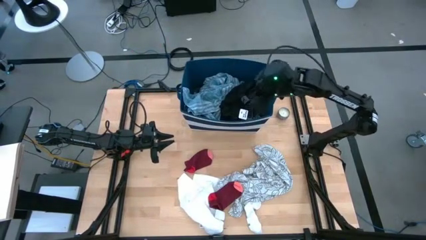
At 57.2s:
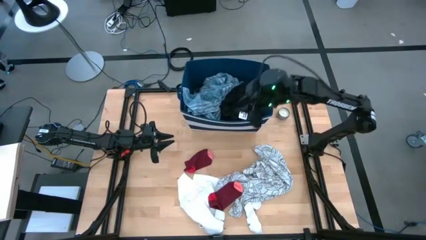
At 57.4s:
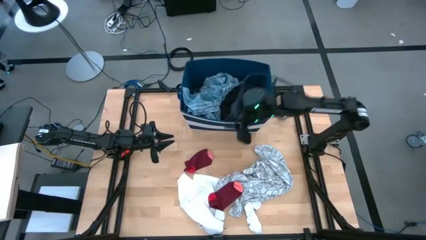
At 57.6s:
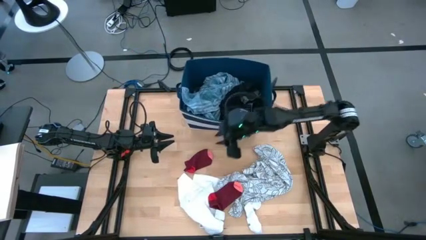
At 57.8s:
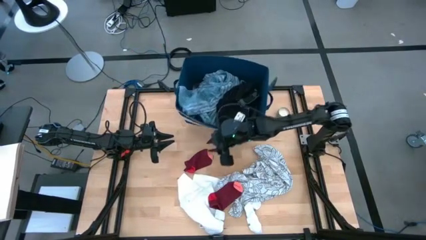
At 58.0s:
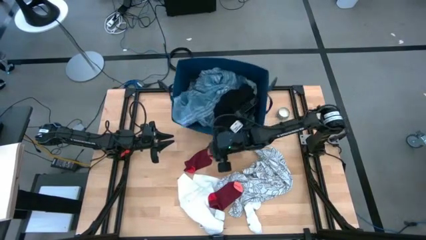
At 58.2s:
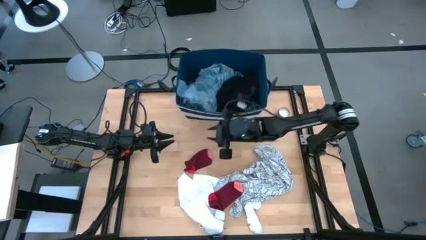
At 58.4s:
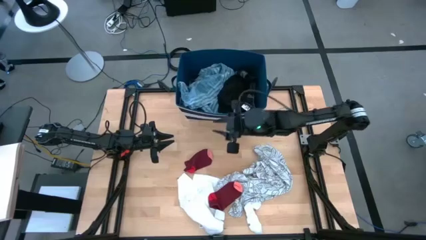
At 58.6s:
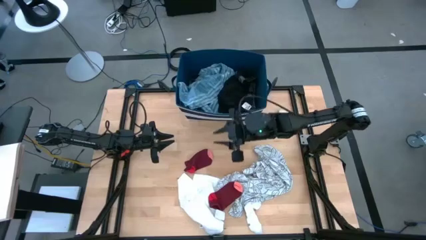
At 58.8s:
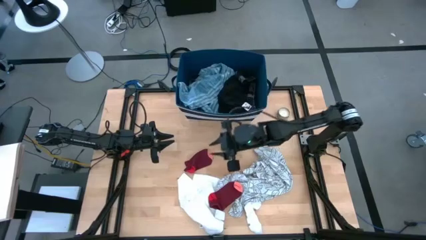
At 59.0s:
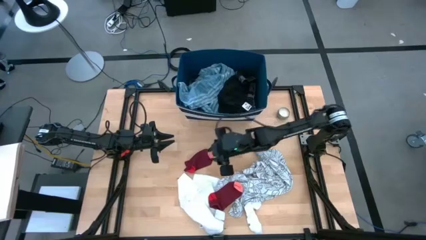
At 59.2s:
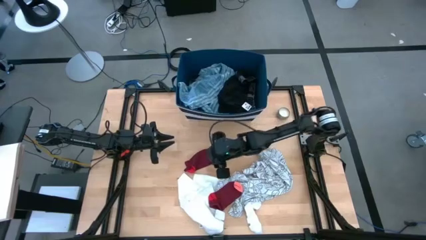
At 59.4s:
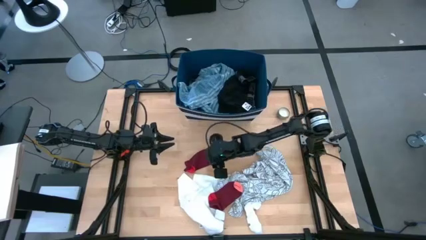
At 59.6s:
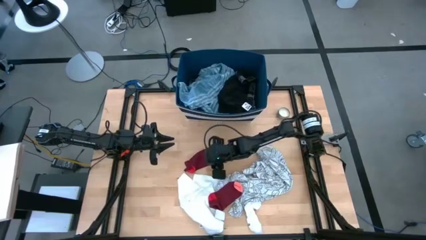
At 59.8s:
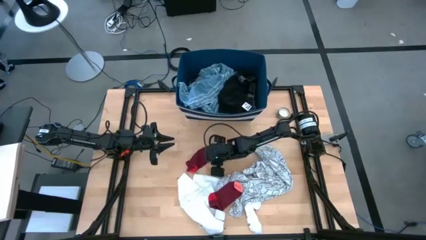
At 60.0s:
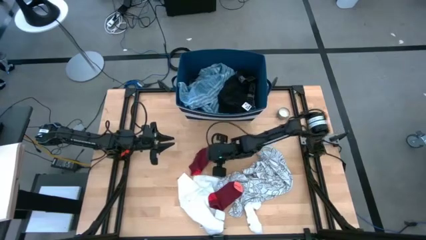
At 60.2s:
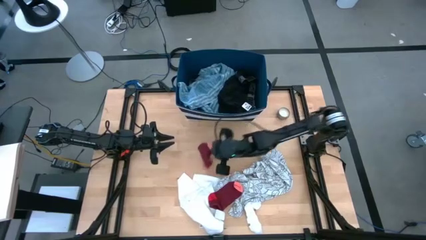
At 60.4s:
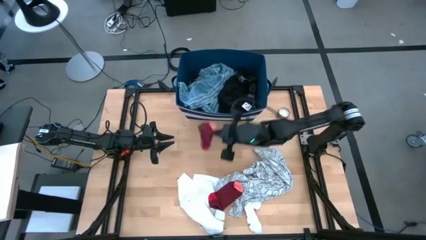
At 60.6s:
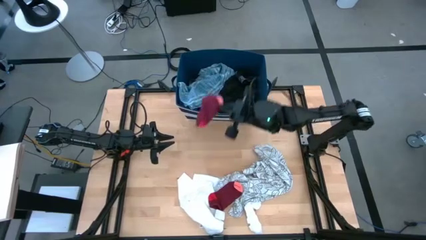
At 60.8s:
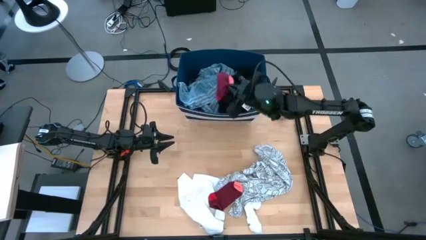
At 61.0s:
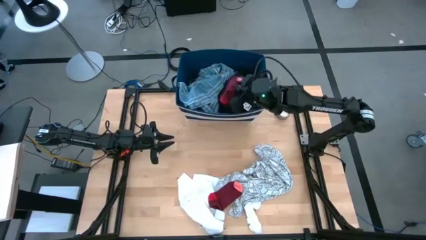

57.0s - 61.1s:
Task: Sort clothes
Put the top red sock into the blue laundry bin

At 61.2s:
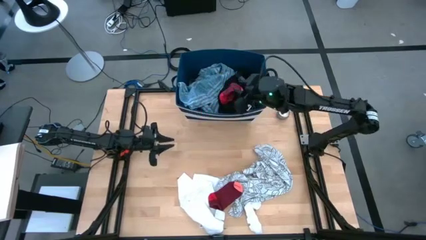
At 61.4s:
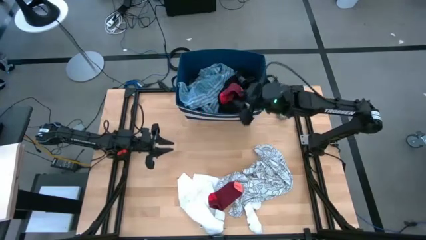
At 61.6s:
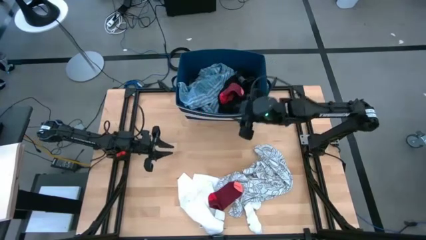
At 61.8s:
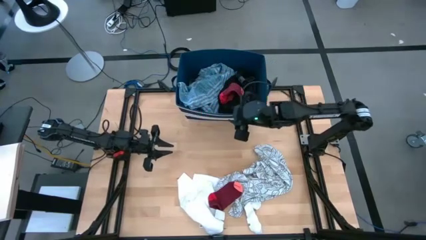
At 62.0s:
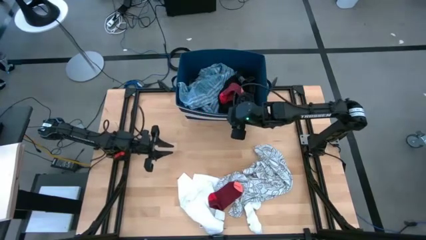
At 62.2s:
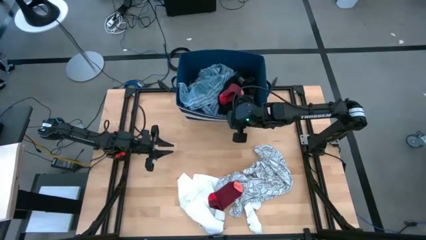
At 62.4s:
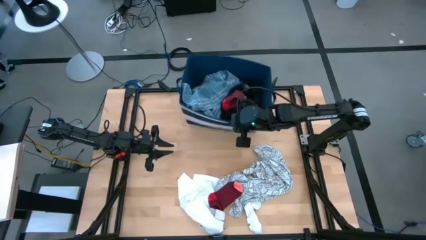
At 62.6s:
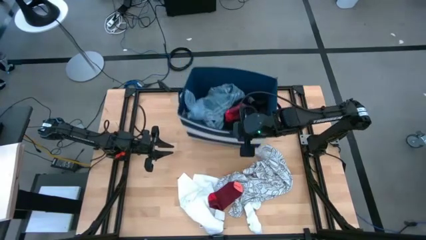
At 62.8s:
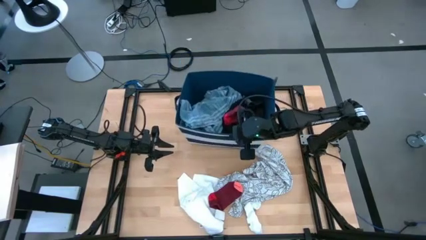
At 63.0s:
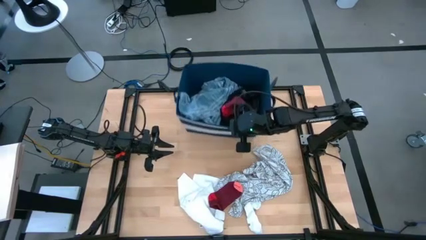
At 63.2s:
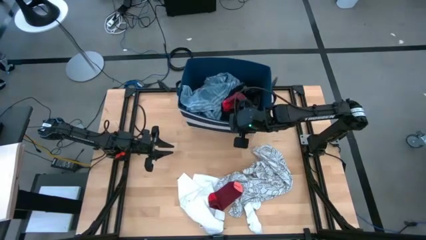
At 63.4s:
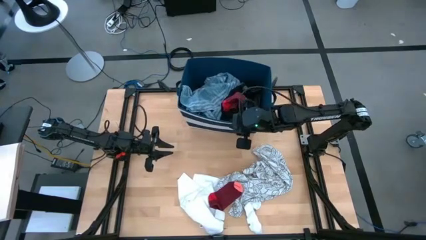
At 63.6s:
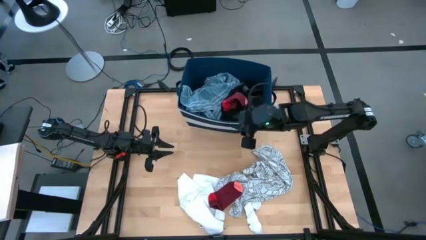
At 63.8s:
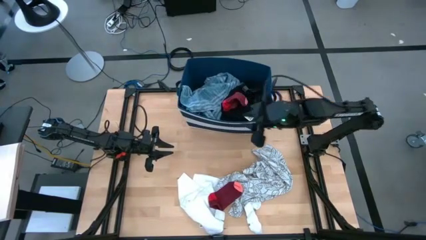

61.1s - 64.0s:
Adjust the blue laundry bin

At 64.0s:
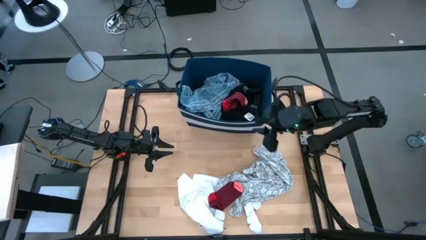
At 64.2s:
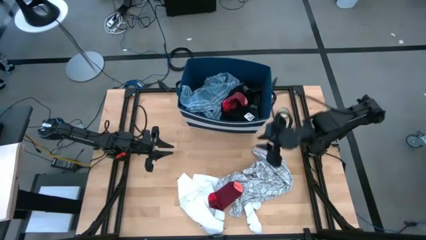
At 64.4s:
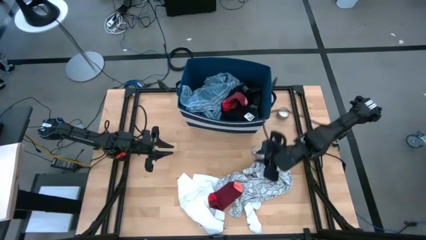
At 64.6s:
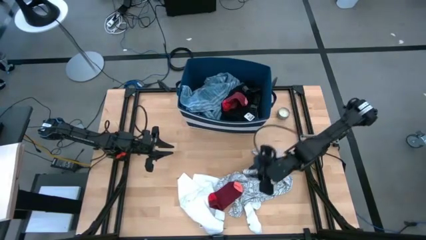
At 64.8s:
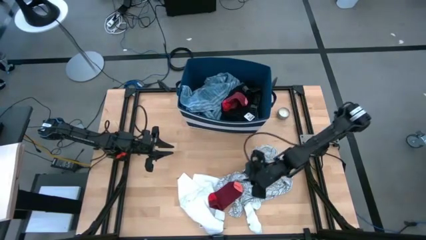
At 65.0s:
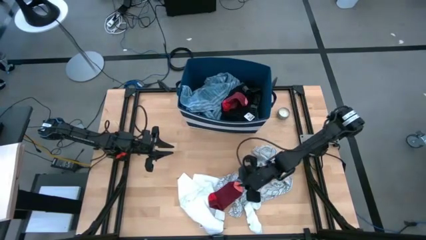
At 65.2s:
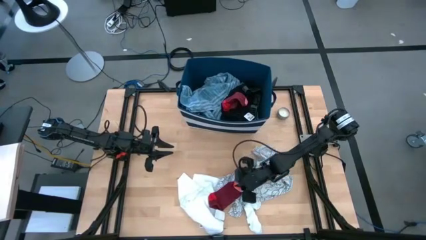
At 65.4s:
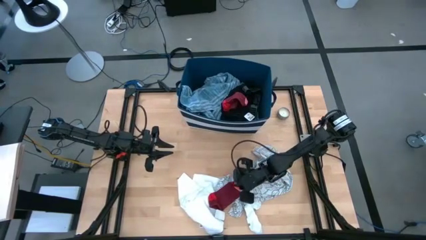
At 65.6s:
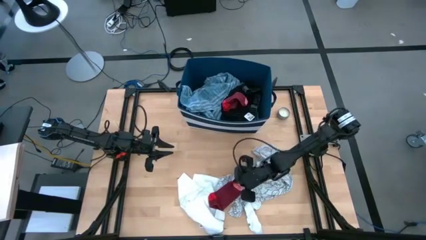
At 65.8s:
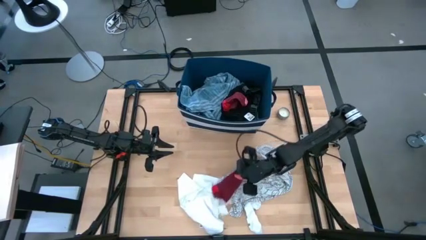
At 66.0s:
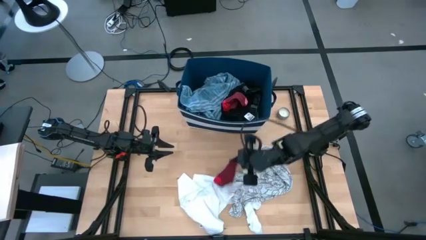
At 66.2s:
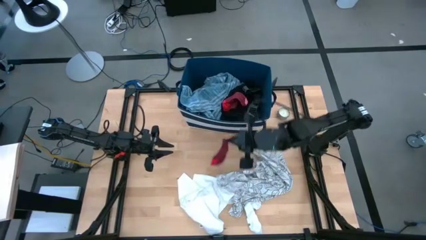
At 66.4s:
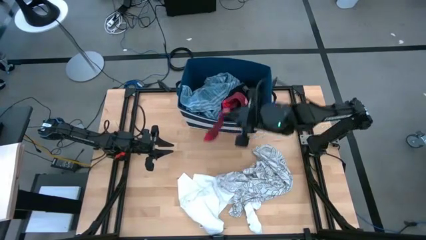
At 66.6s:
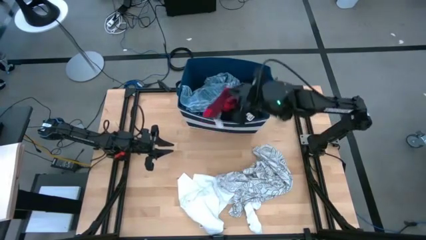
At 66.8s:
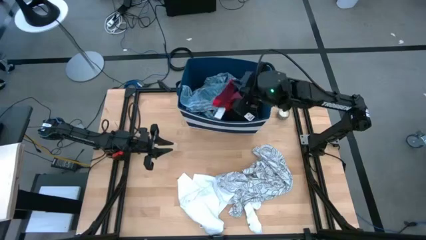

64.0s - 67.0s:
Put the red sock into the blue laundry bin

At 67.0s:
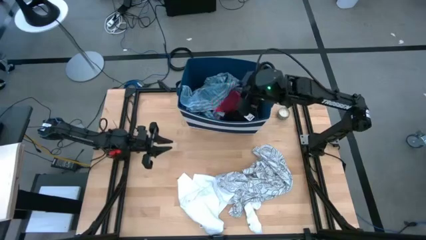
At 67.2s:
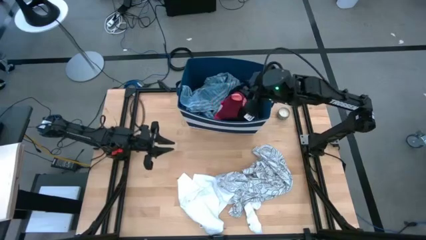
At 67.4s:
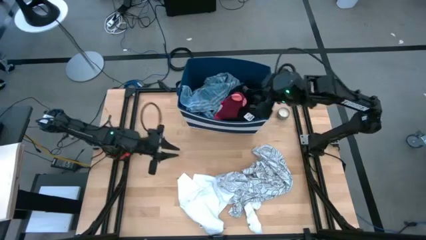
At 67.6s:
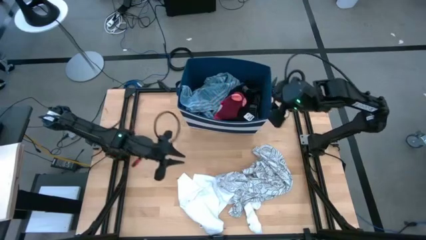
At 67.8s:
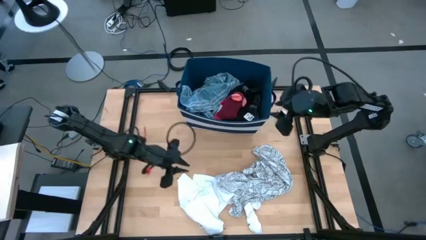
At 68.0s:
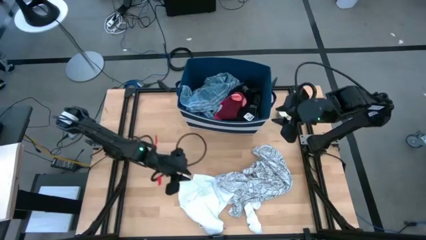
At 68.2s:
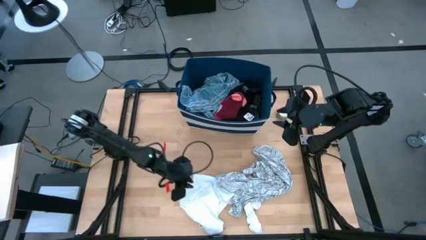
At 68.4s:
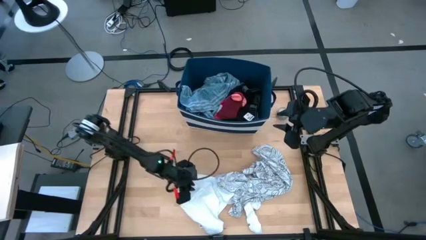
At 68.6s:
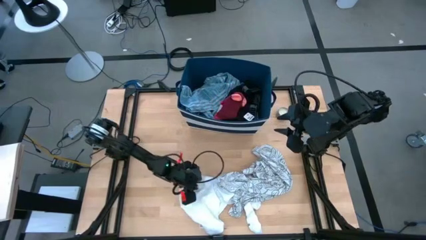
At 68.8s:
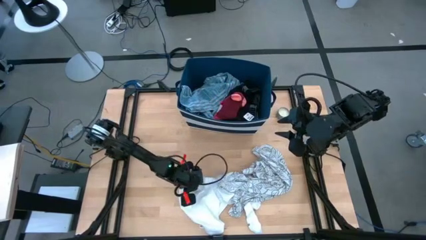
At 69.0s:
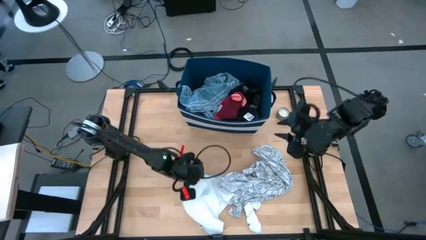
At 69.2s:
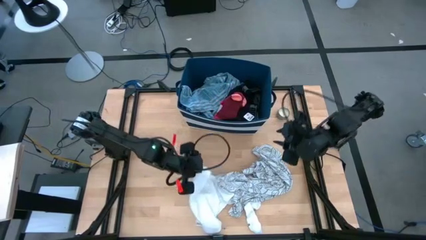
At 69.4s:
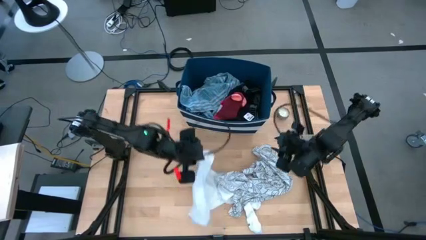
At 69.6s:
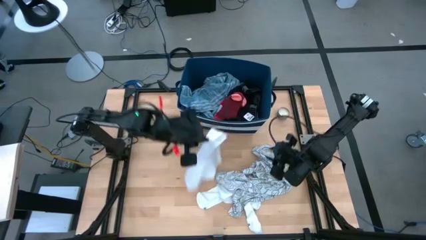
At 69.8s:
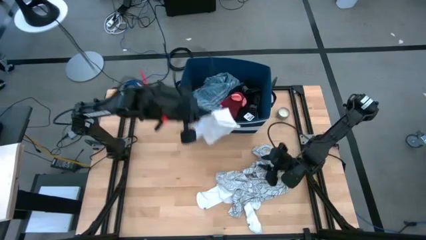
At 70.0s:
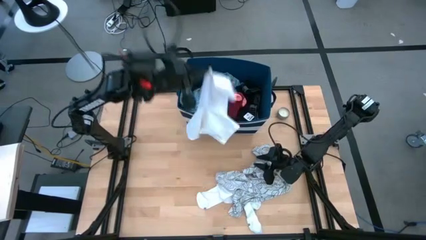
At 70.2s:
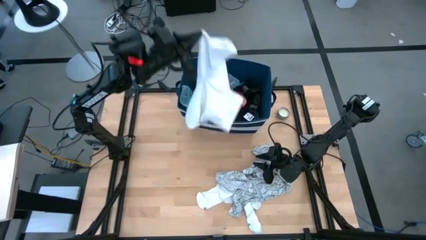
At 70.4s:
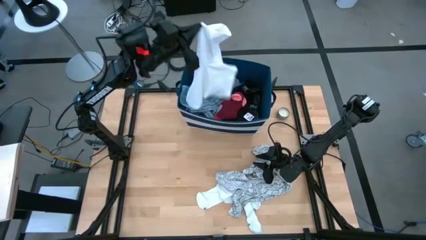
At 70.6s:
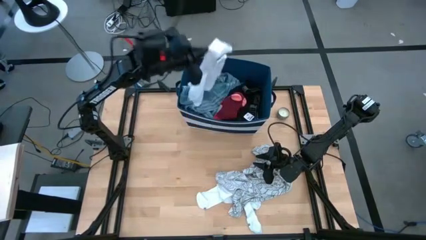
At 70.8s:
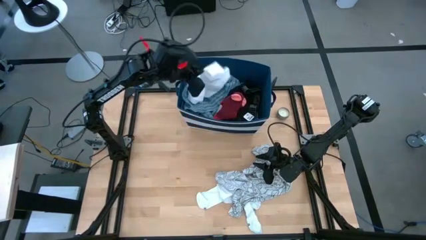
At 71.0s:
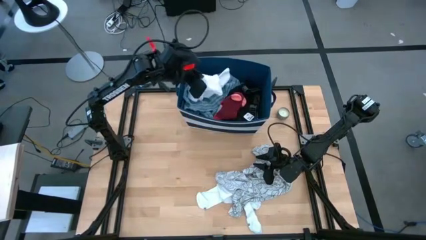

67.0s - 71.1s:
Put the white short into the blue laundry bin

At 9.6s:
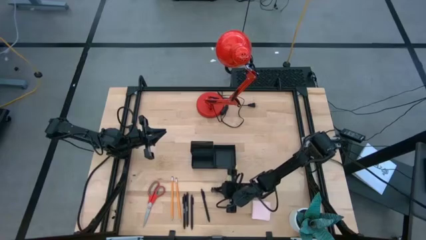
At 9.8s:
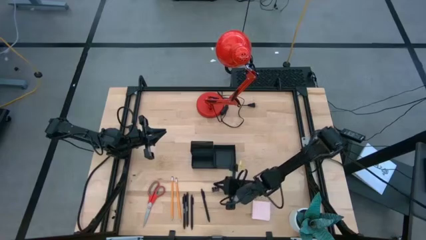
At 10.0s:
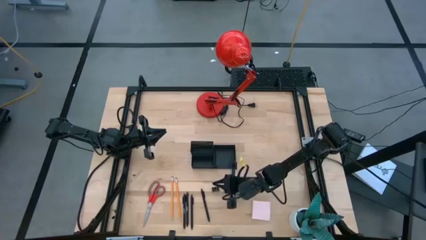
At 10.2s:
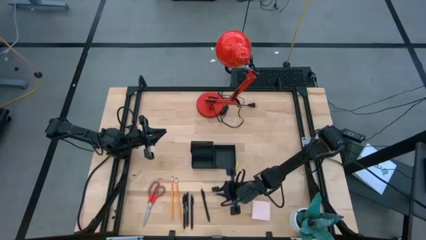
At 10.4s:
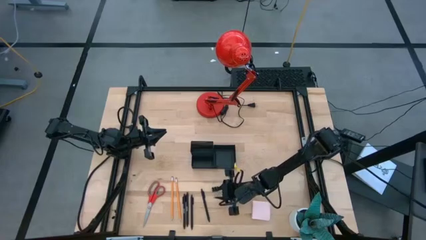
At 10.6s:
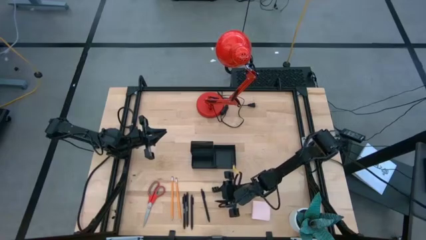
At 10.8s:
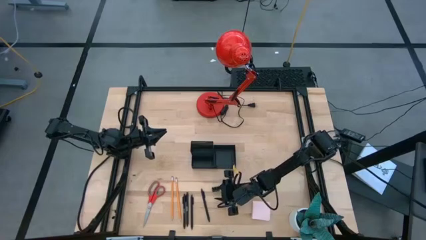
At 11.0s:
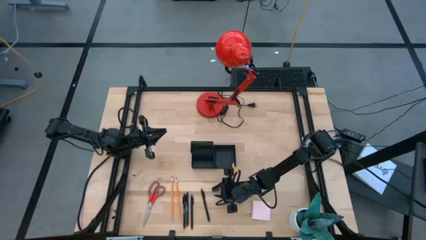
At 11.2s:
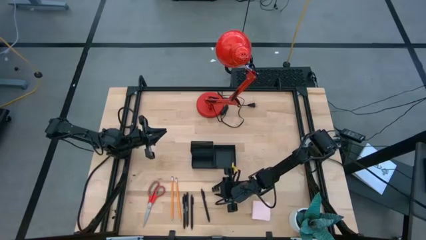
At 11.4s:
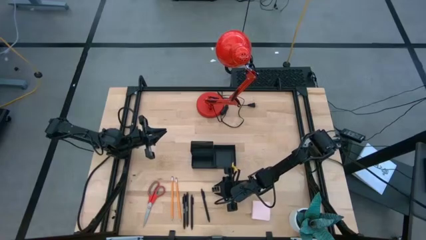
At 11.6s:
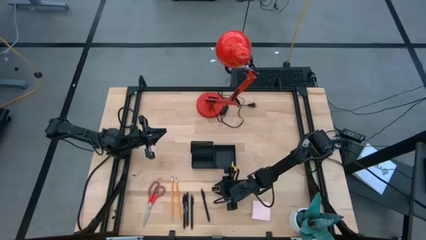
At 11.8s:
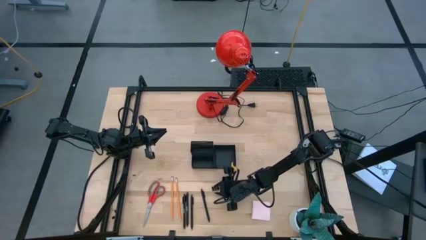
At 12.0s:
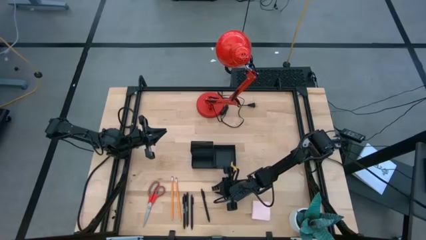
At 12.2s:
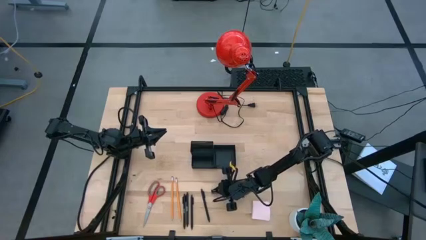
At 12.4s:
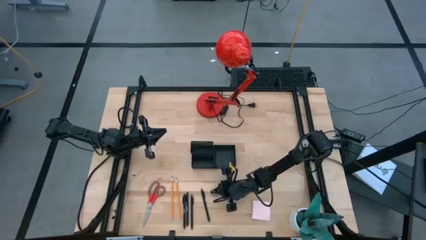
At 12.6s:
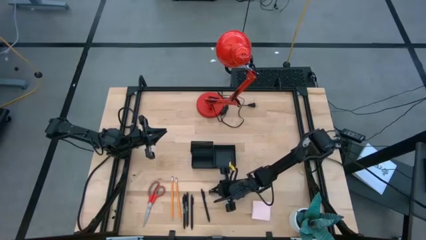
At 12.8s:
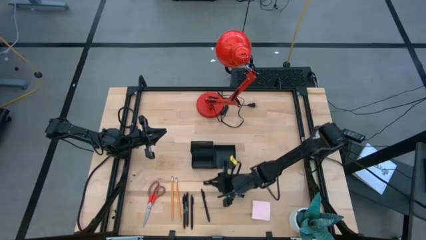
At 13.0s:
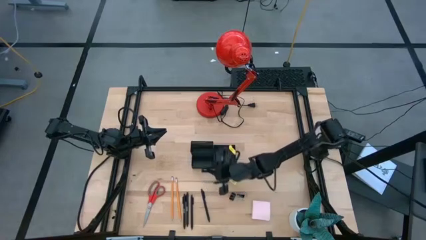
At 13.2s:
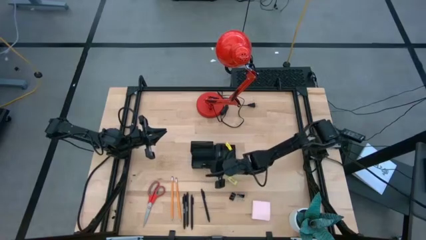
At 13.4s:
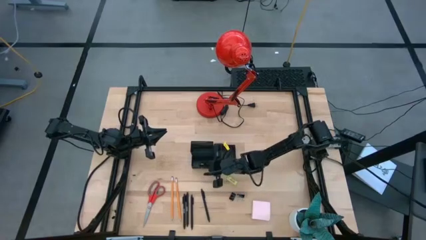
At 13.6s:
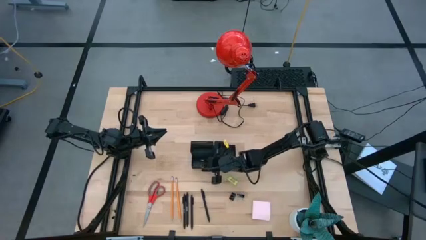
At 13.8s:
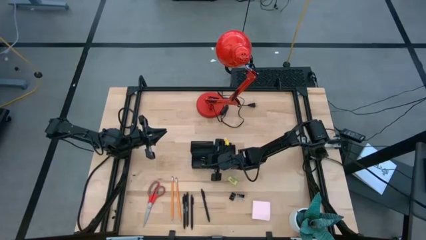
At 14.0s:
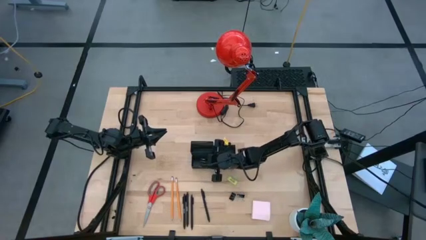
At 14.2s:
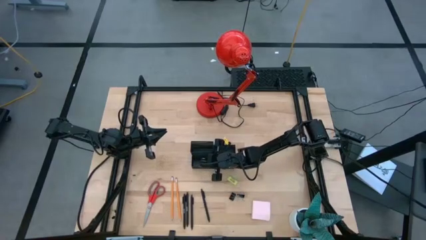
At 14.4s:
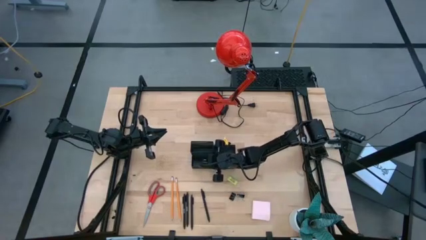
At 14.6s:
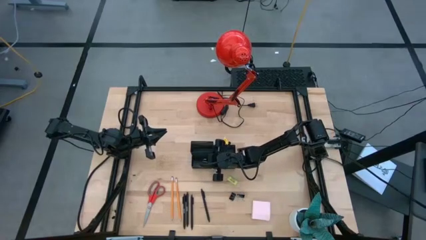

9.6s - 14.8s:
Task: Pick and place office supplies into organizer
Put the black binder clip into the black mesh desk organizer
